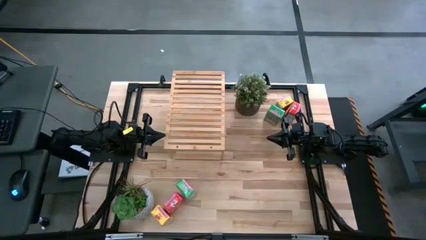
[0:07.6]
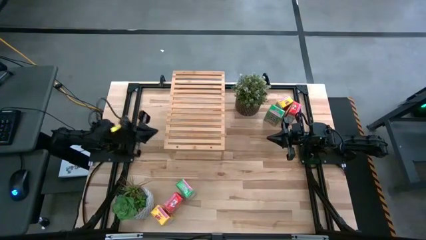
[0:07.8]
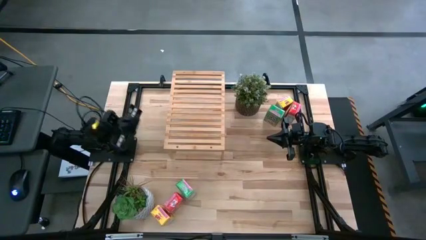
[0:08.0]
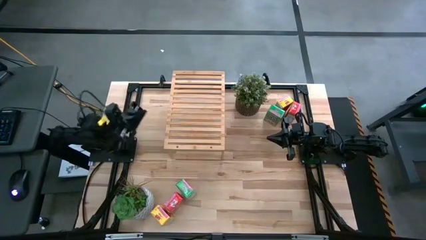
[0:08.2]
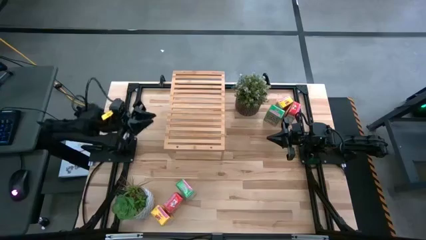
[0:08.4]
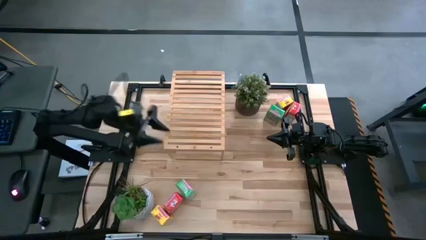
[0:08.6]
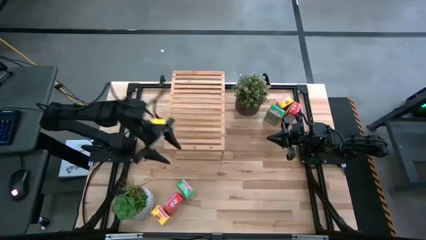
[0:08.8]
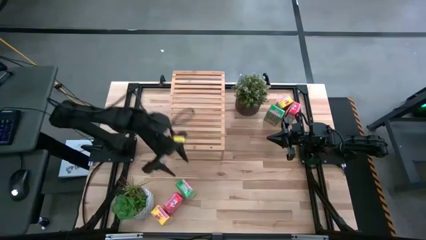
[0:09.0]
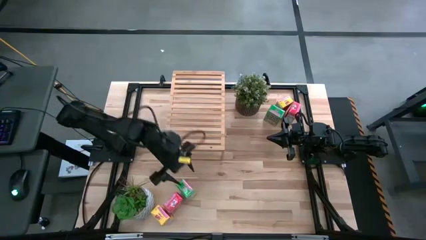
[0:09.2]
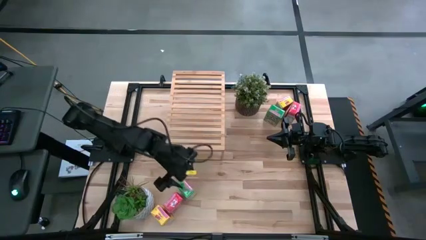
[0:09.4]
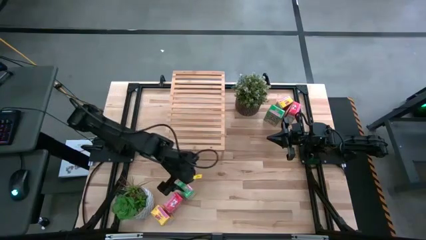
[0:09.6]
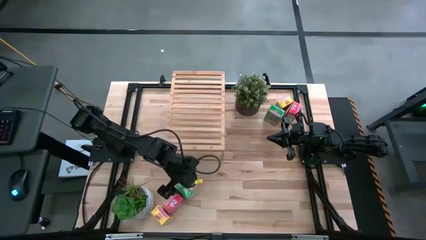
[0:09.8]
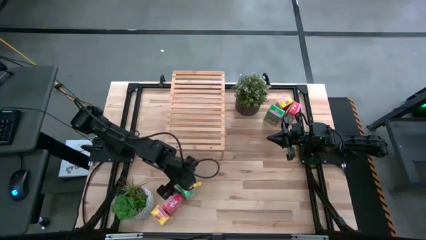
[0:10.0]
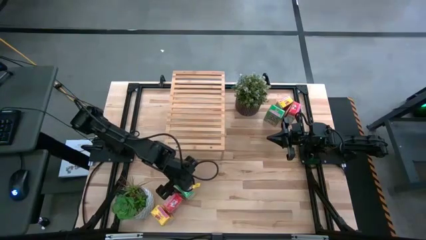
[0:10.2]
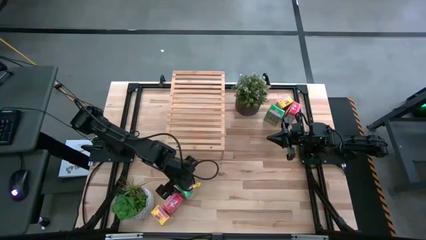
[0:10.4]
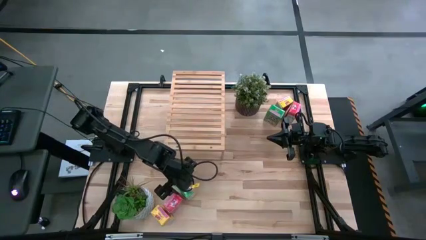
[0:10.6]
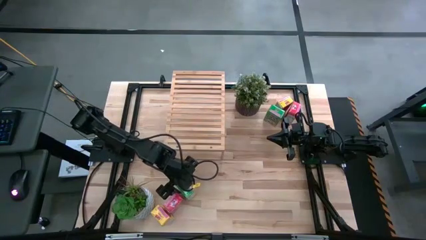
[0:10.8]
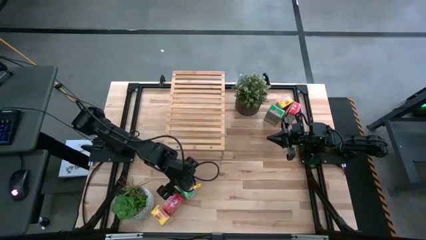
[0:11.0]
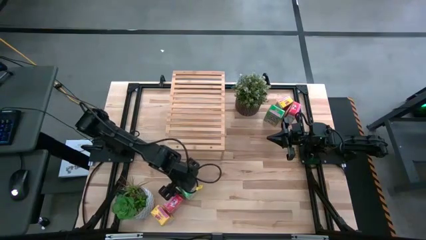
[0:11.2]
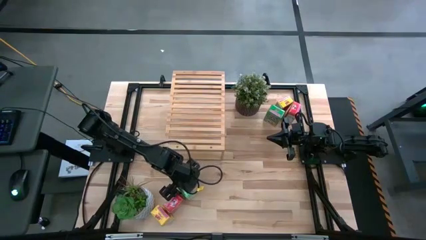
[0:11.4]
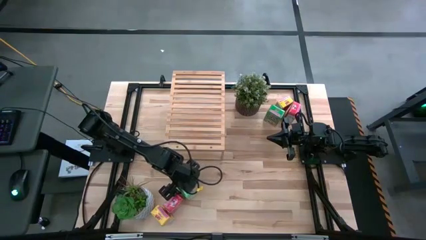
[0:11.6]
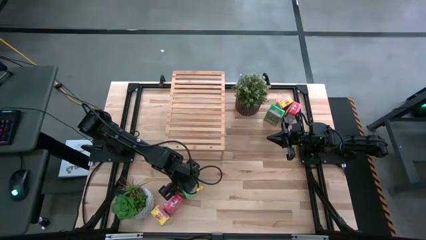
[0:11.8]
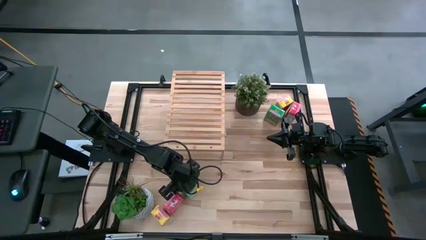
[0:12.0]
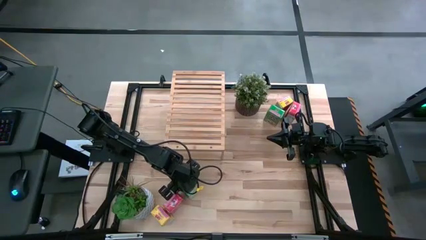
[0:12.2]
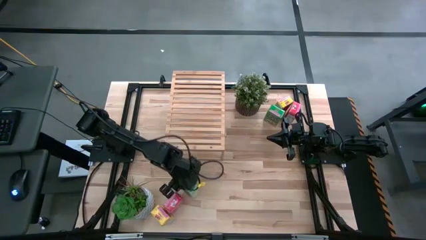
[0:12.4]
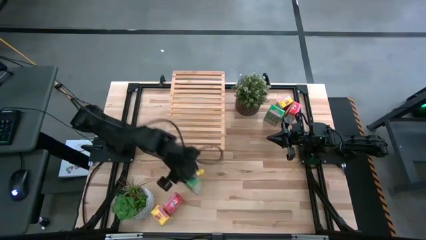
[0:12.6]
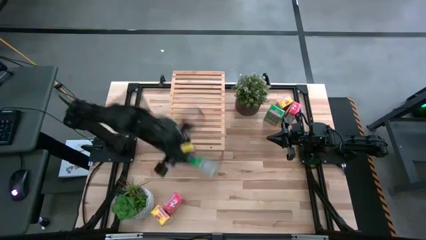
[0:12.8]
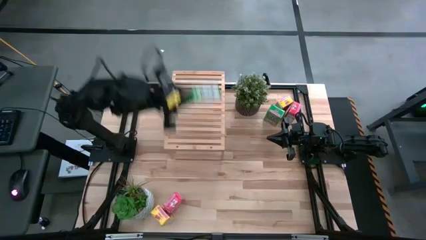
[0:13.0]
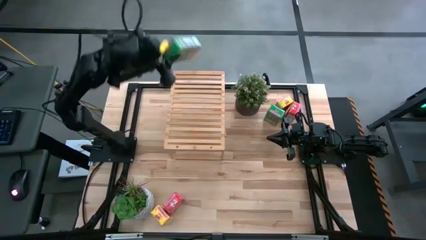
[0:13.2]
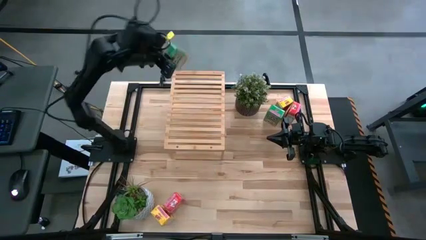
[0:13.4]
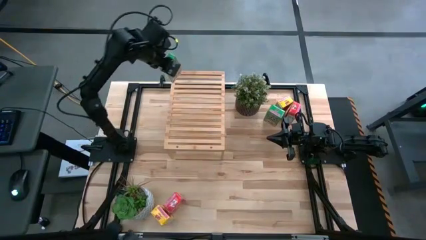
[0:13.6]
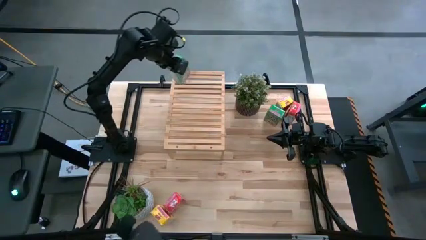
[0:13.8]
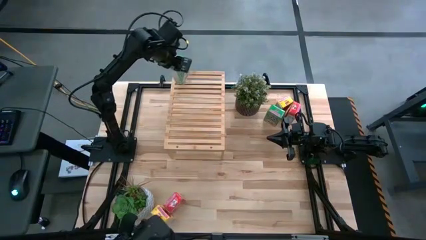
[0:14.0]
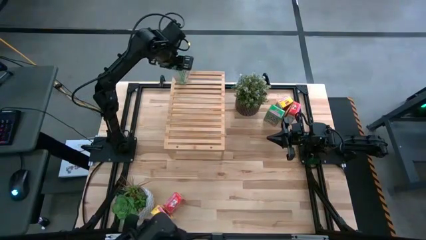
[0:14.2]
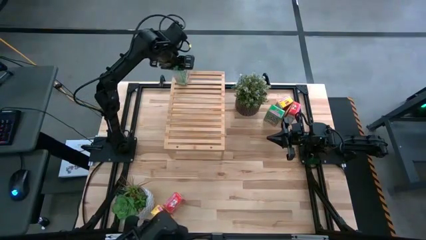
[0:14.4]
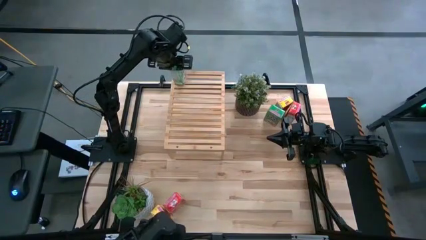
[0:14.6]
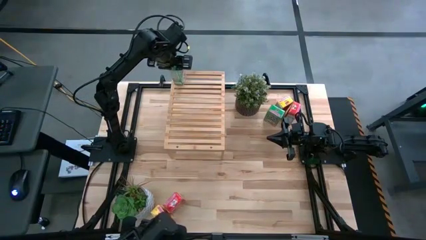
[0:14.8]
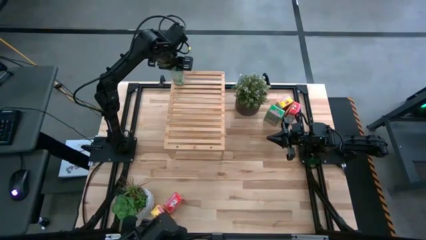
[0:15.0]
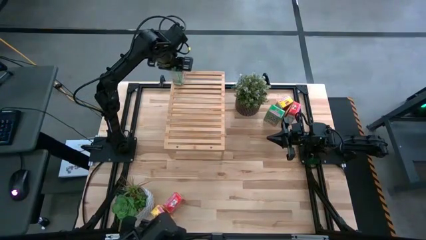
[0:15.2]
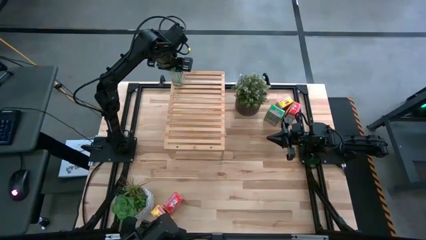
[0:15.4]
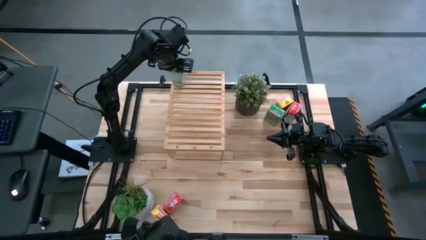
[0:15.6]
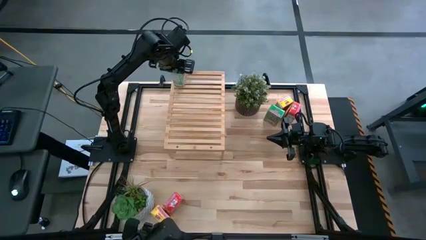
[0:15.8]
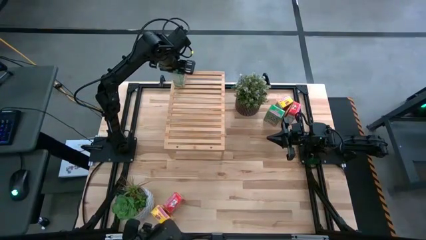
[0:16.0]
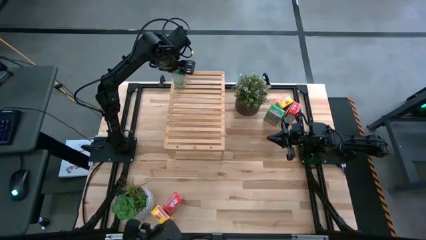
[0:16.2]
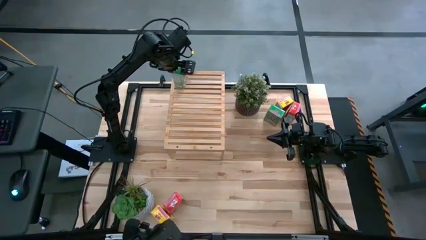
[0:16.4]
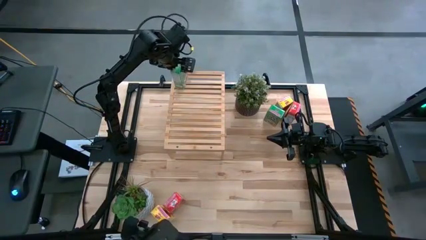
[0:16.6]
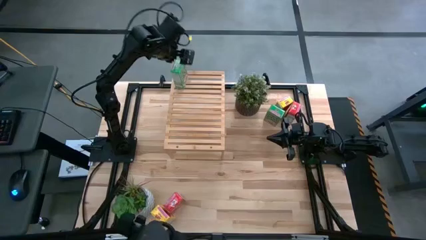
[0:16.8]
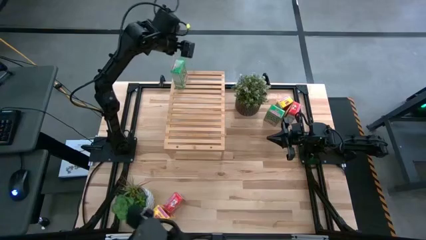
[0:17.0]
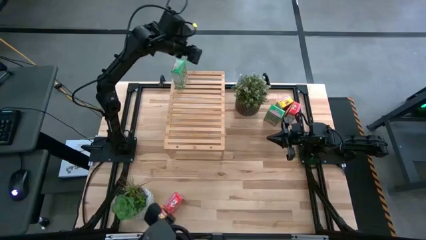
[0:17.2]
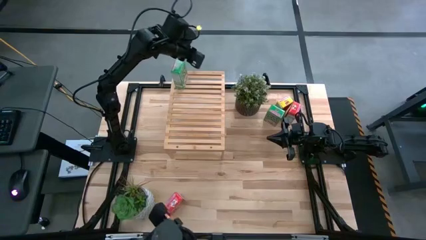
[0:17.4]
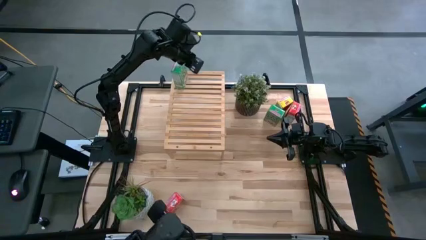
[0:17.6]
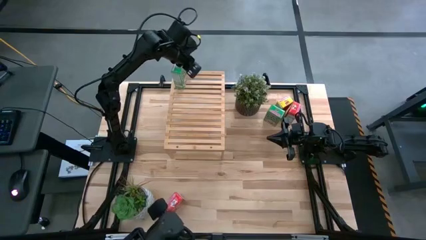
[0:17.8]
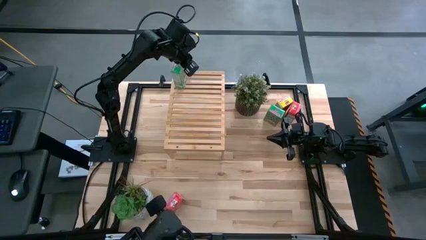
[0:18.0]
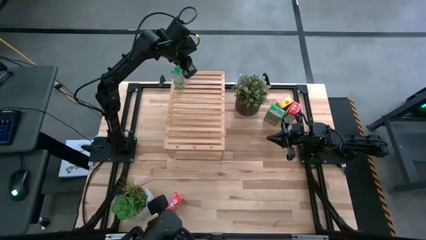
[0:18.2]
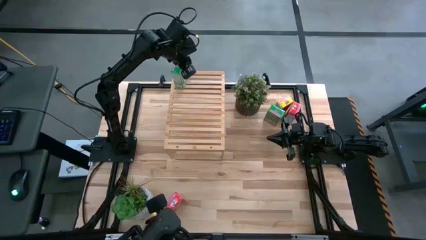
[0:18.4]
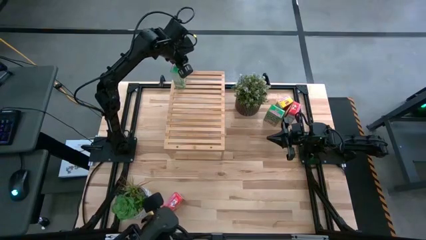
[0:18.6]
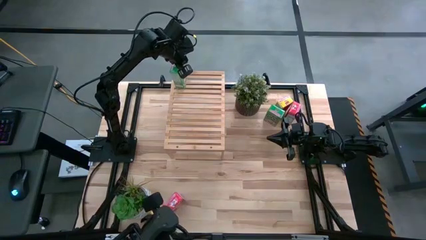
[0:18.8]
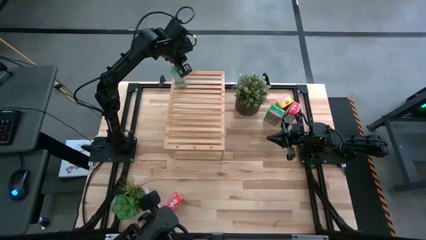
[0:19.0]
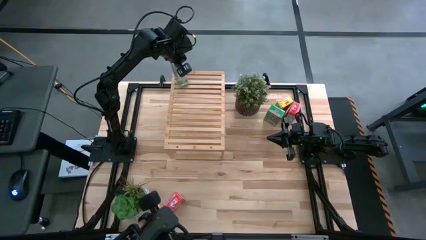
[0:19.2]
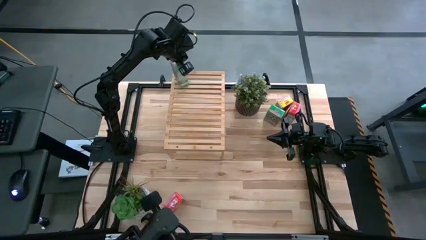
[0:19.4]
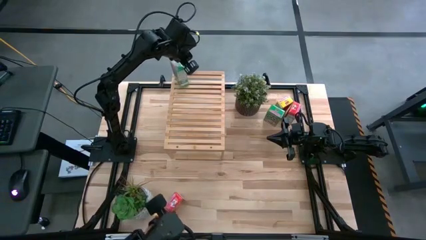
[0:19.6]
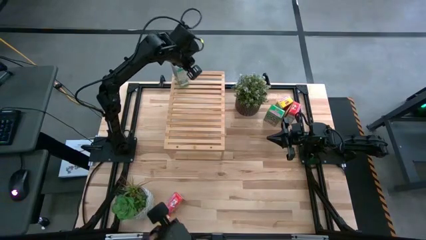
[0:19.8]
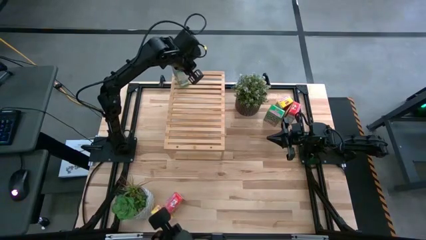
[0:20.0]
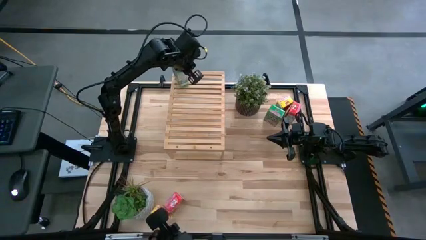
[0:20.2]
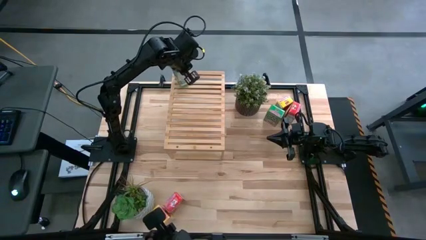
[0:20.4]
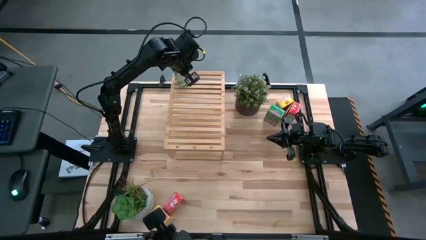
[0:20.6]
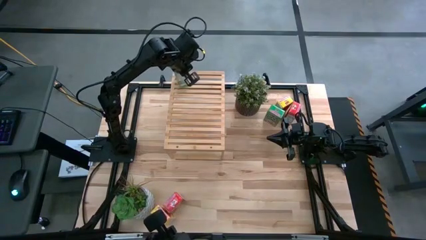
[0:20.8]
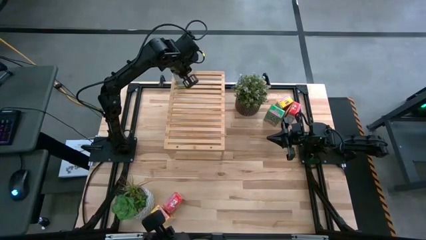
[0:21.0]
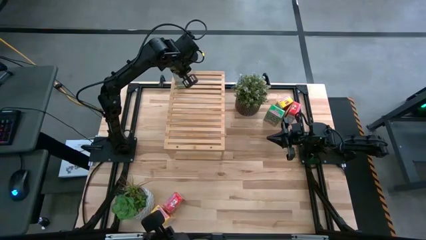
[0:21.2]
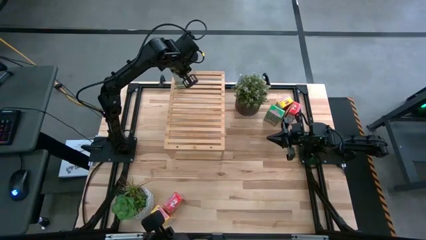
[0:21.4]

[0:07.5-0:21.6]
Task: Stack cereal on shelf
Put the bottom green cereal box on the shelf
